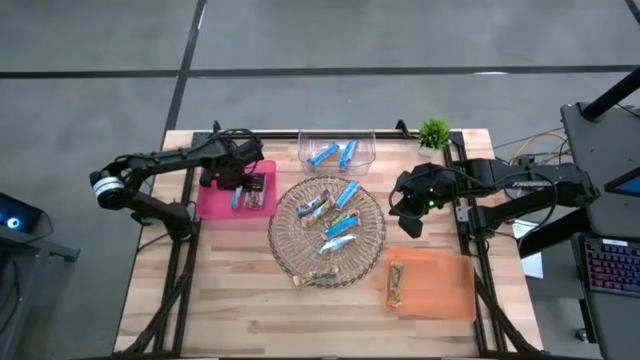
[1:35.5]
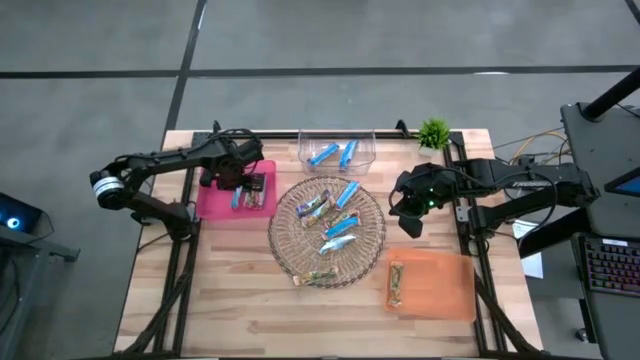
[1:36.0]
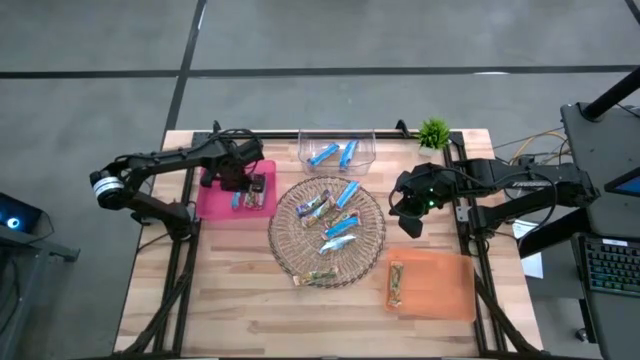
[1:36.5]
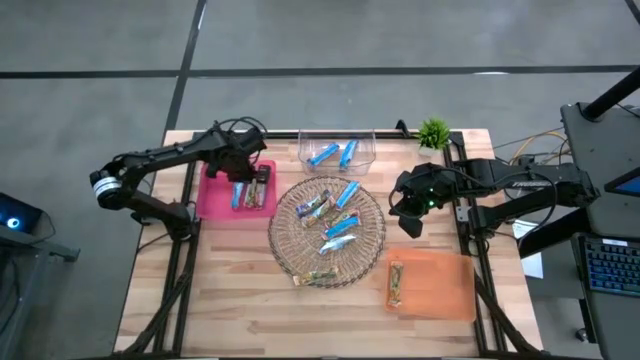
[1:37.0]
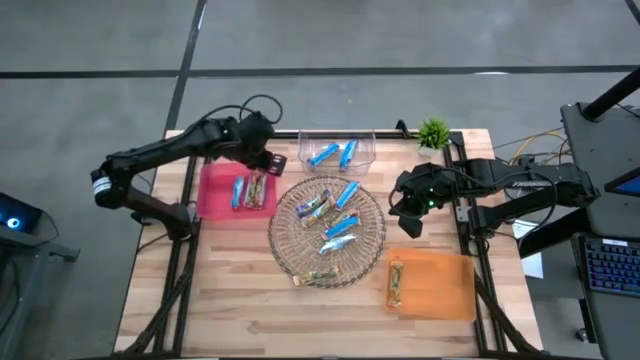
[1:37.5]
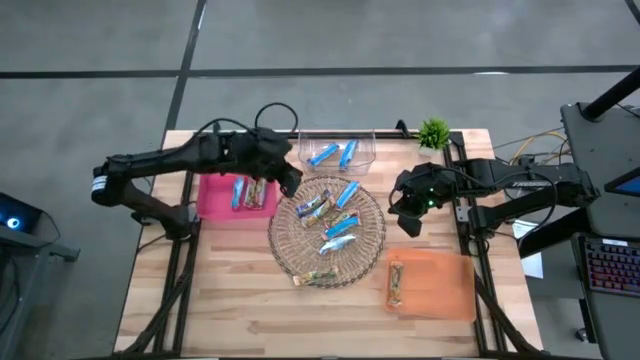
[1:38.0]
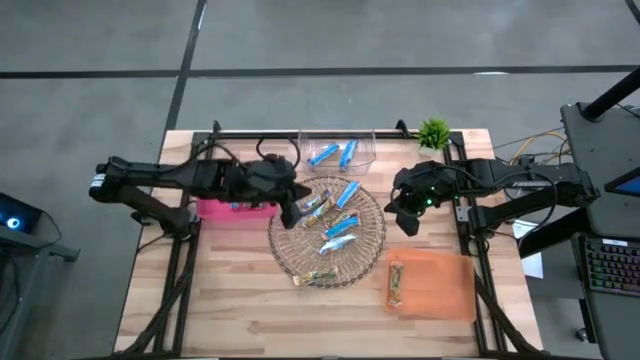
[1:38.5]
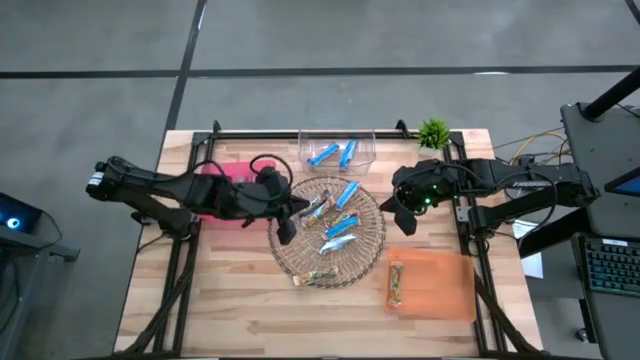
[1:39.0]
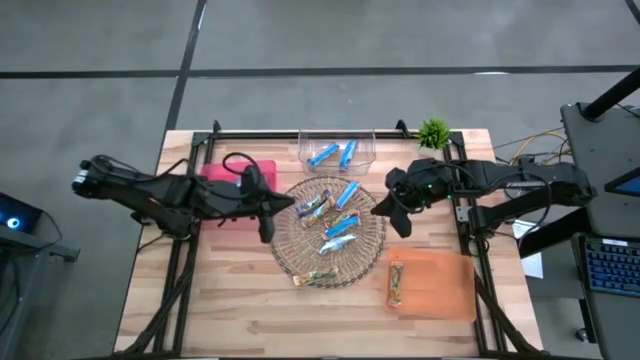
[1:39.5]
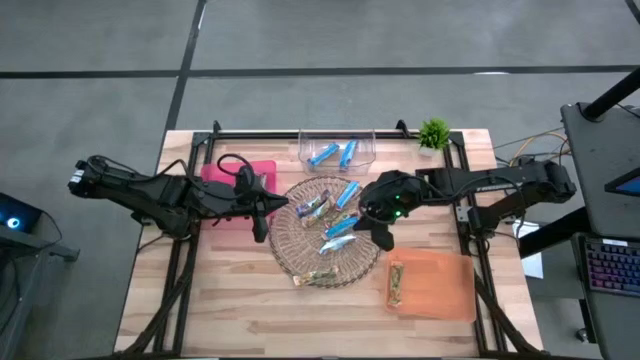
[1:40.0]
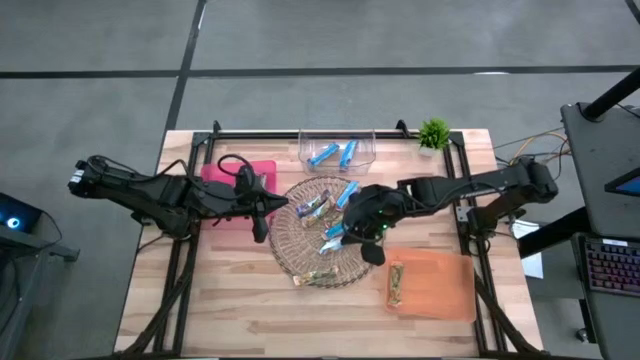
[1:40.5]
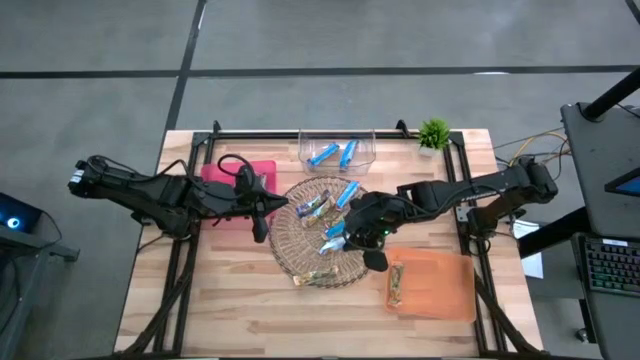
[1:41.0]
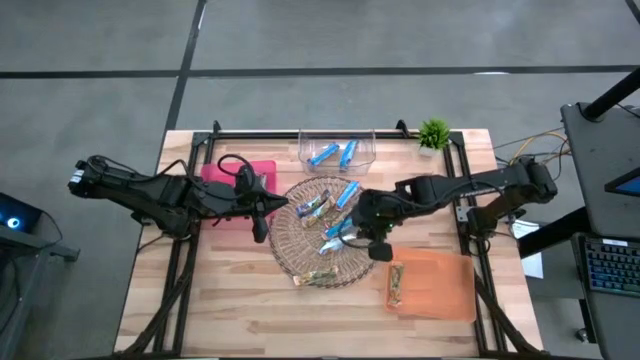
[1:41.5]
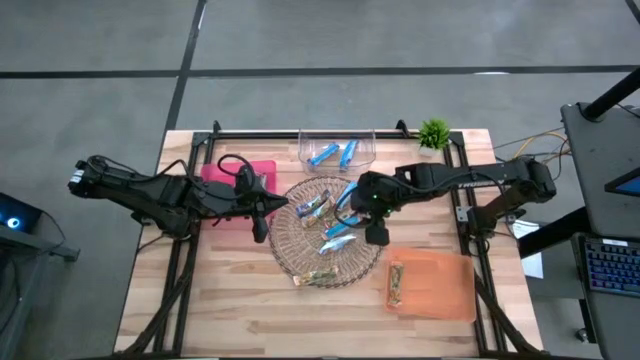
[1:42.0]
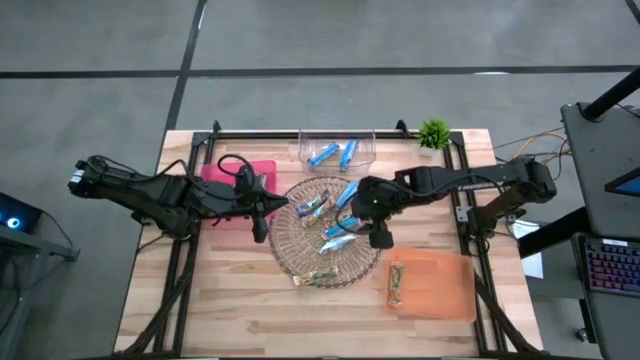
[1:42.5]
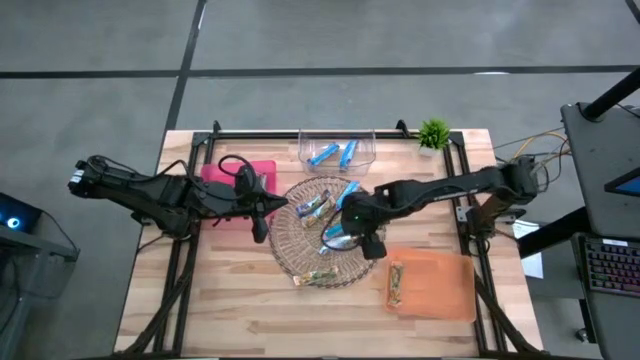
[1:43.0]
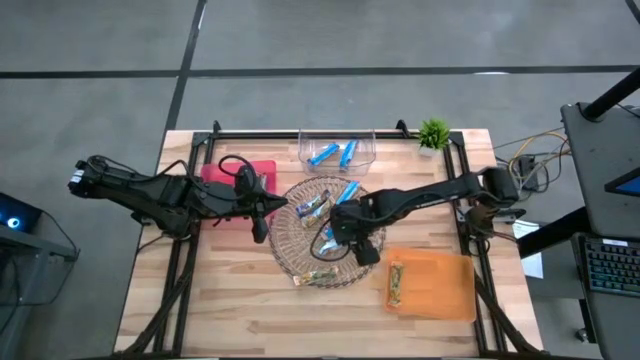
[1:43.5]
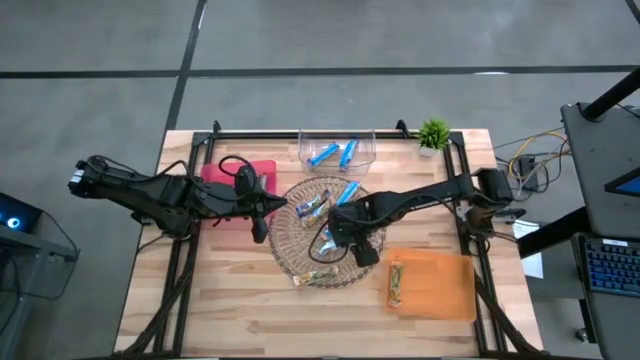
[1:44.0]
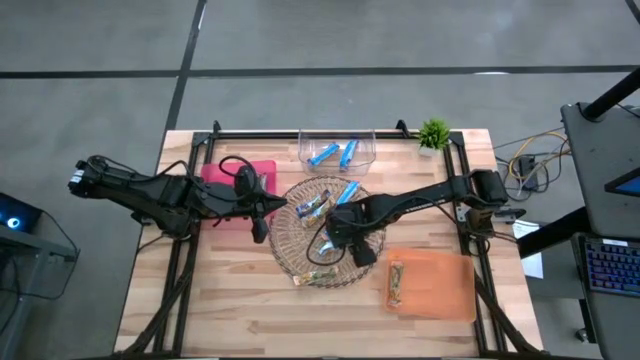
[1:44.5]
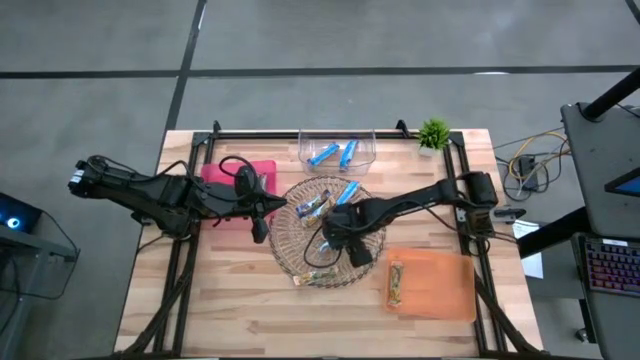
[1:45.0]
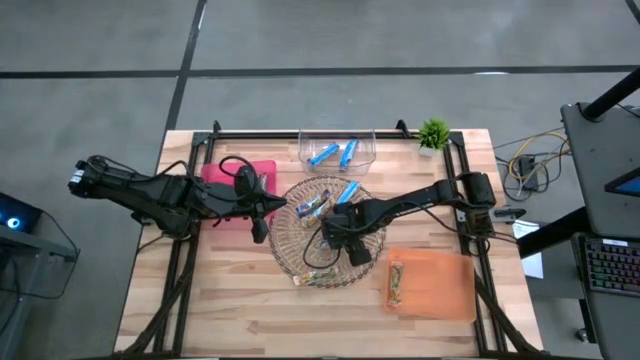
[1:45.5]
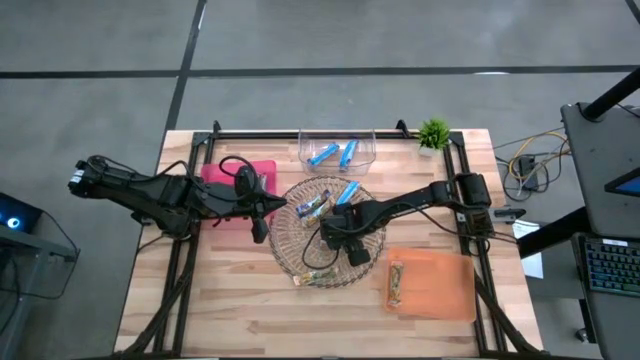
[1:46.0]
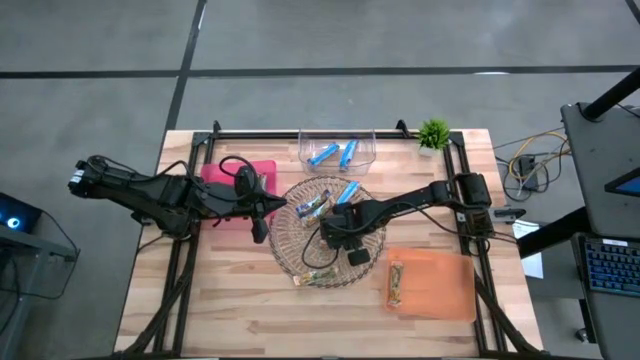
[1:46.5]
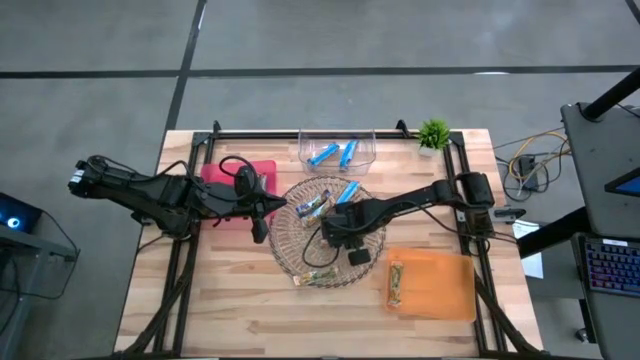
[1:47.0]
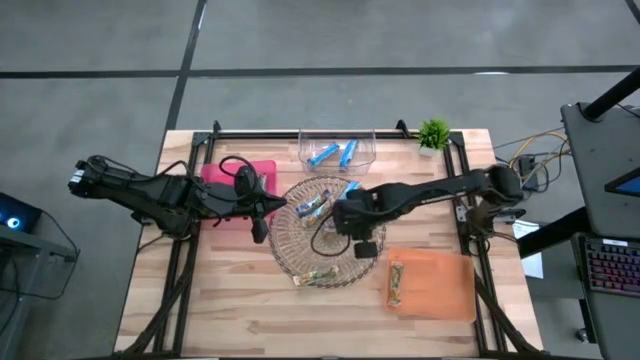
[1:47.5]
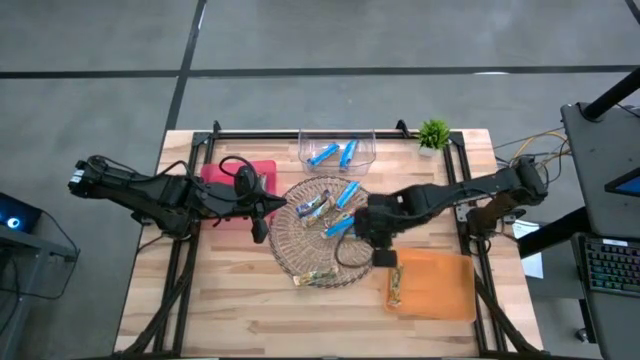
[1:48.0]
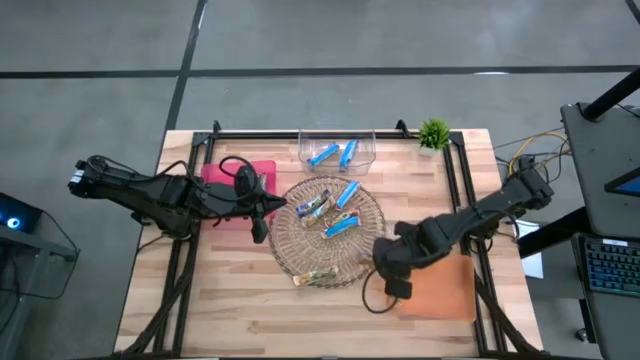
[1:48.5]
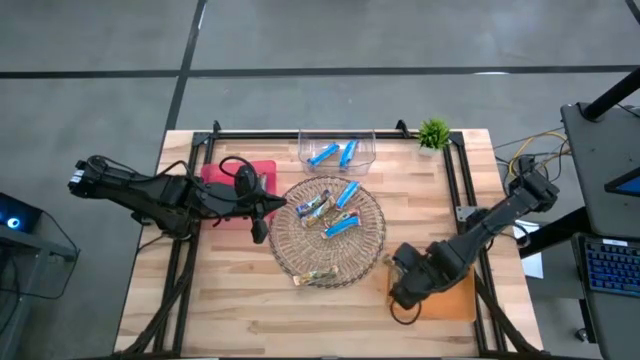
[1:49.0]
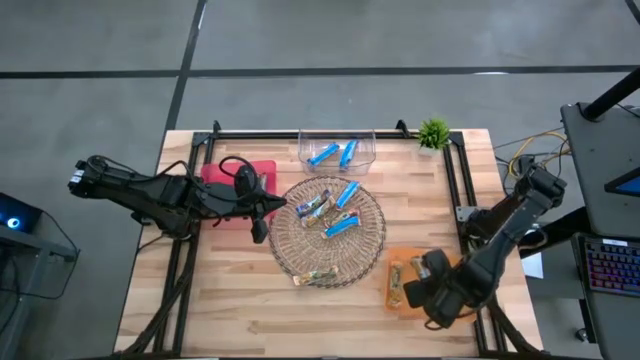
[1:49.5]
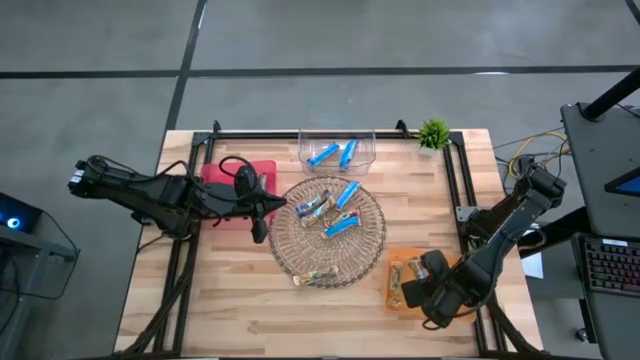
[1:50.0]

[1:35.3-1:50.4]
Task: Pick and place Granola Bars by type
Put the yellow granola bar into the orange bin

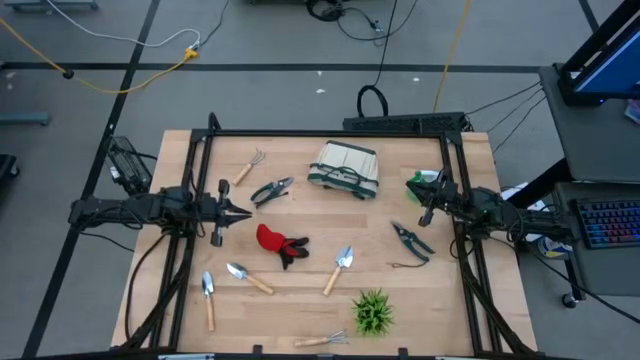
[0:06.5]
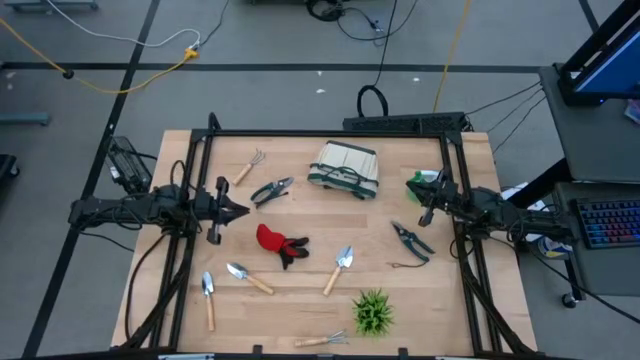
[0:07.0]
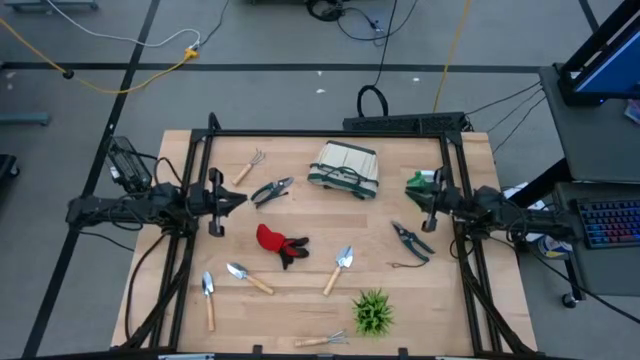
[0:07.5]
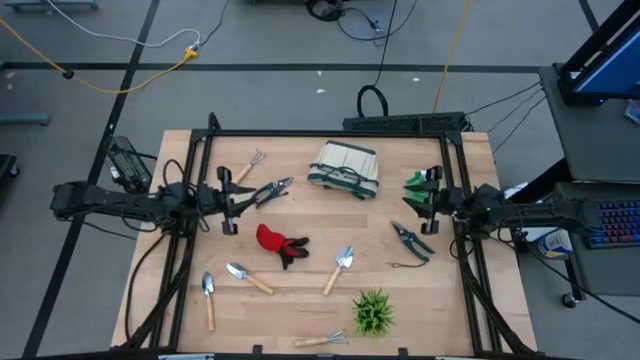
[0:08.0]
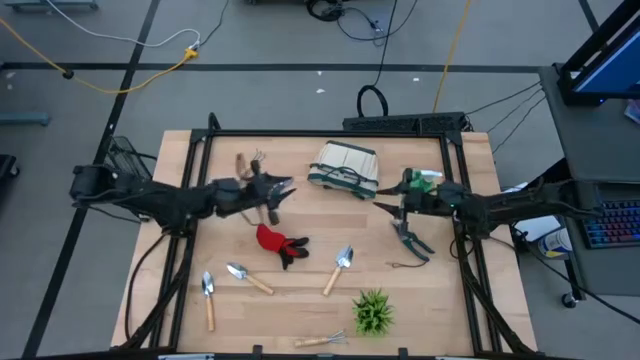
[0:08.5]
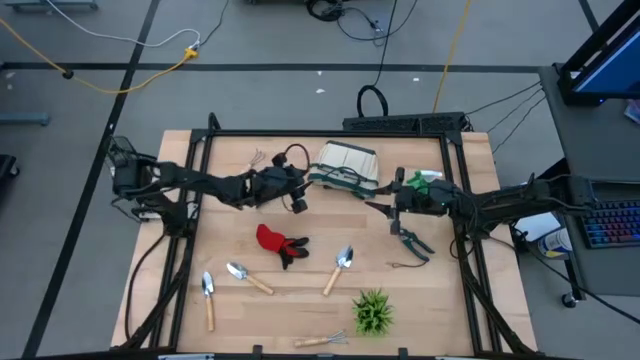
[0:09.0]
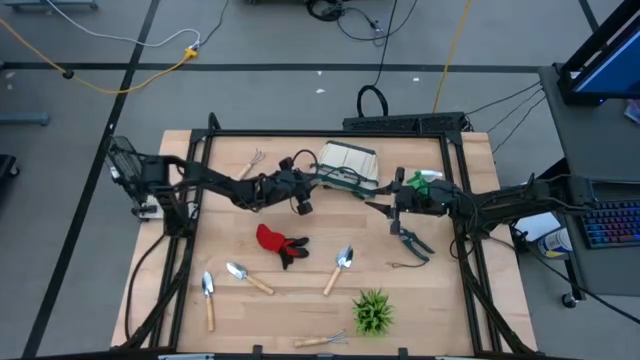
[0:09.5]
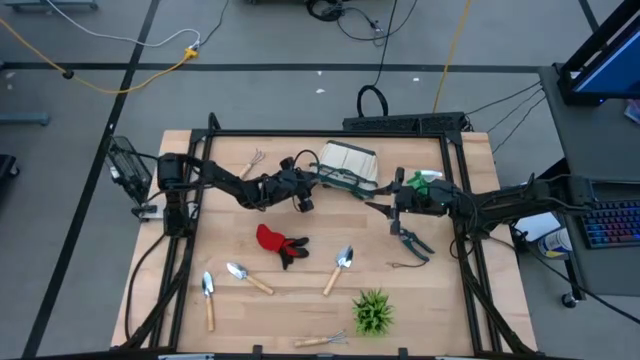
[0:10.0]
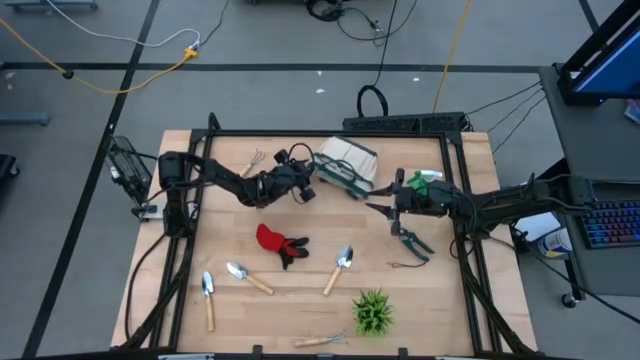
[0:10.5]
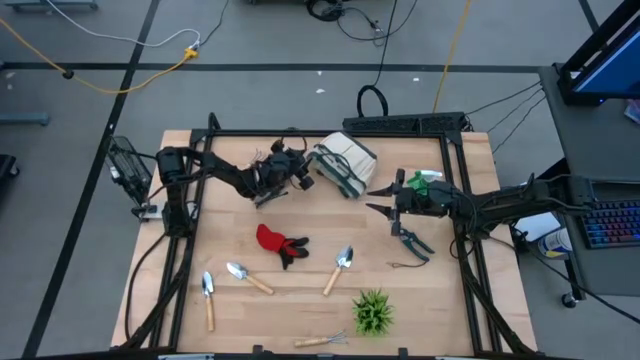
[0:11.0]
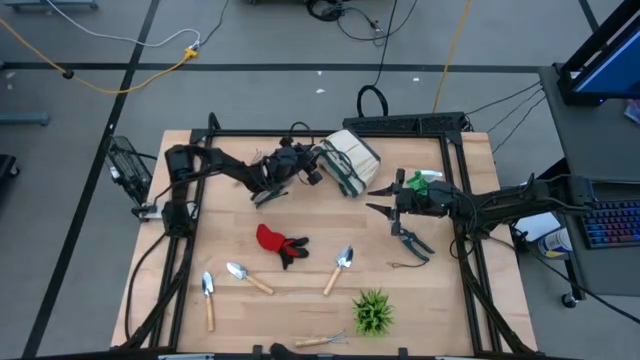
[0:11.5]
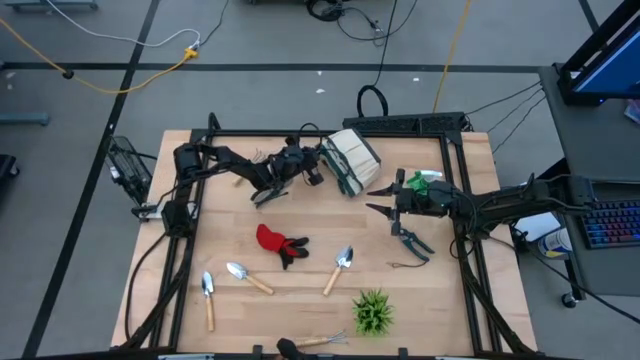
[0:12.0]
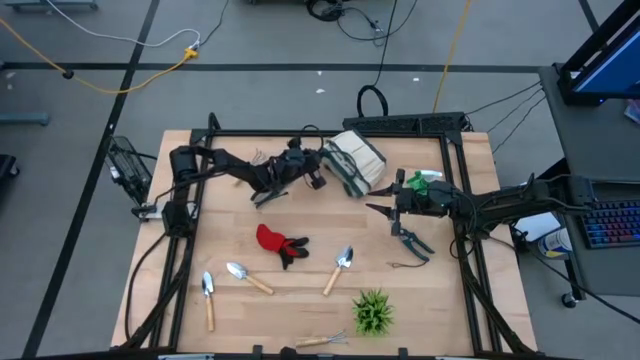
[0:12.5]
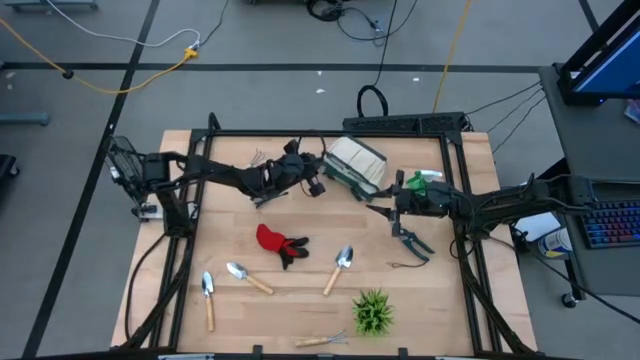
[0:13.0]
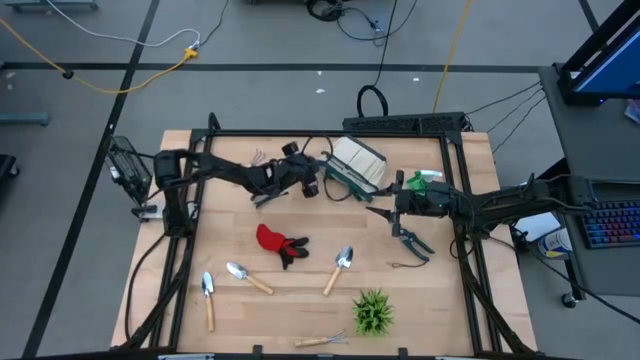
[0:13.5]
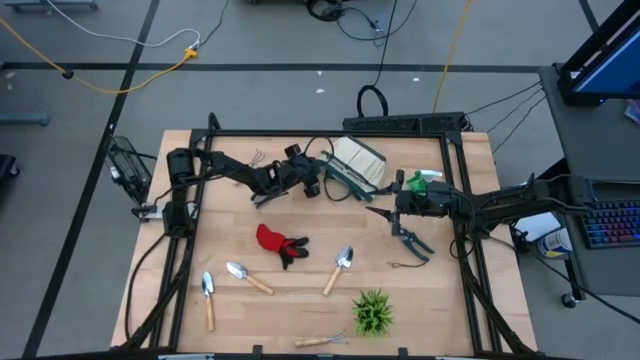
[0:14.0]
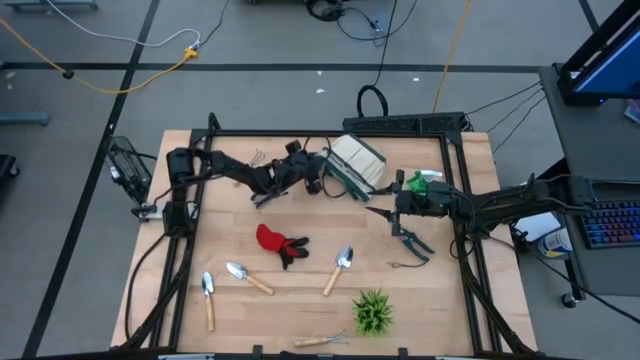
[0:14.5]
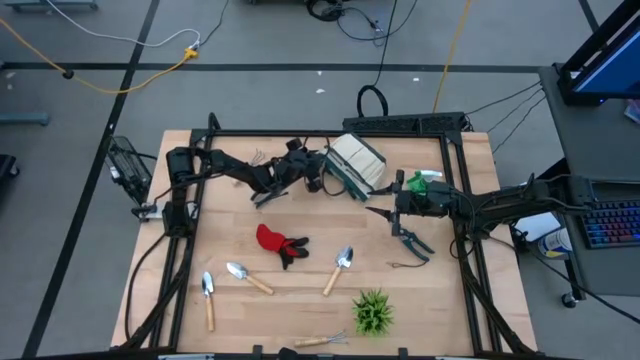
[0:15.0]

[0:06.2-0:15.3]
Task: Pick & Place Garden tools in Gardening bag
Prepare the gardening bag on the table
